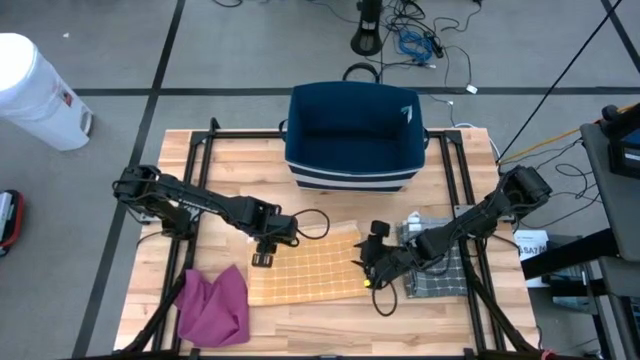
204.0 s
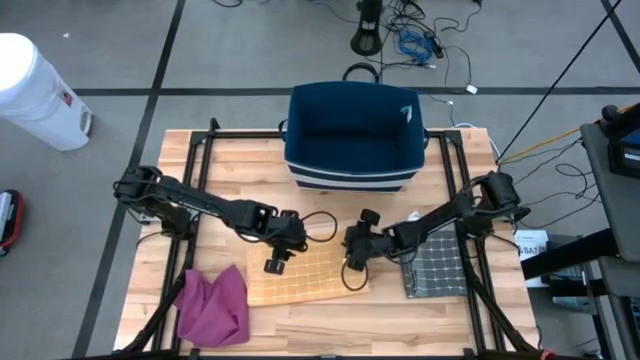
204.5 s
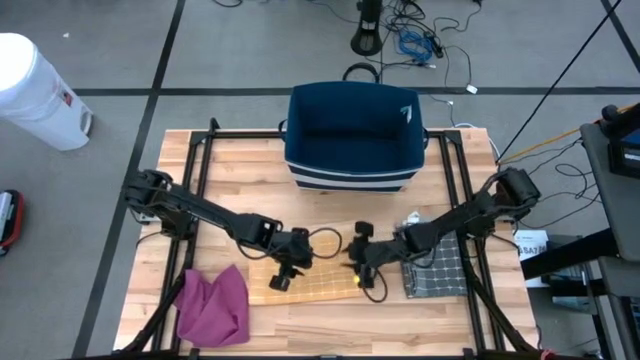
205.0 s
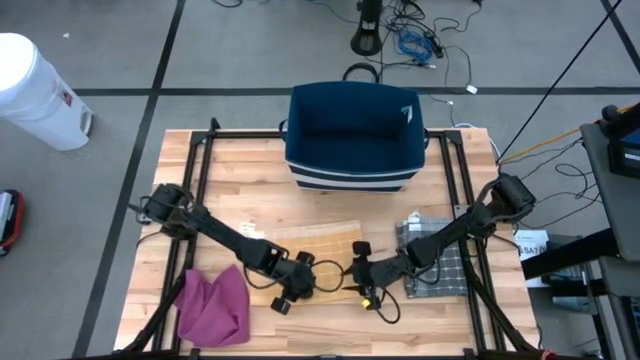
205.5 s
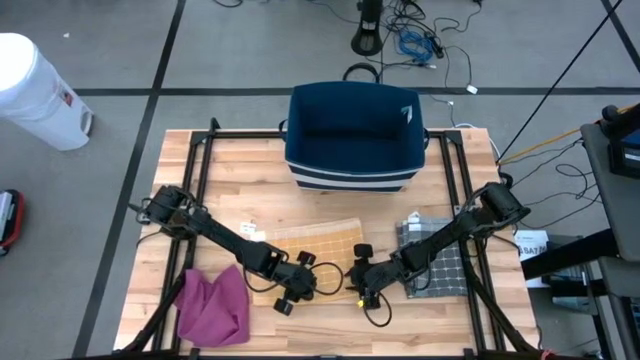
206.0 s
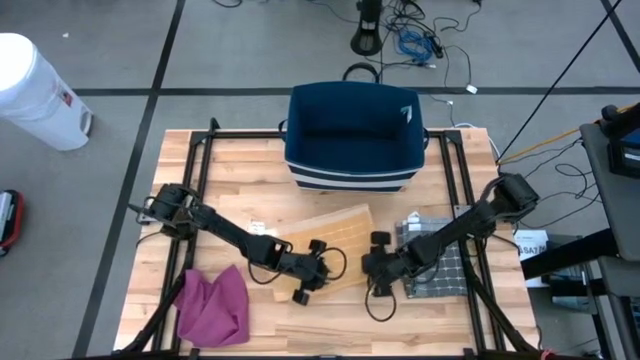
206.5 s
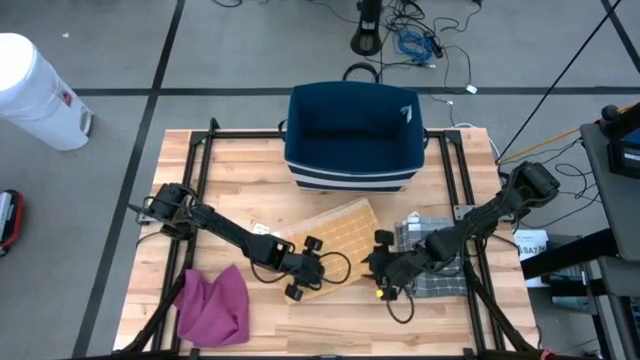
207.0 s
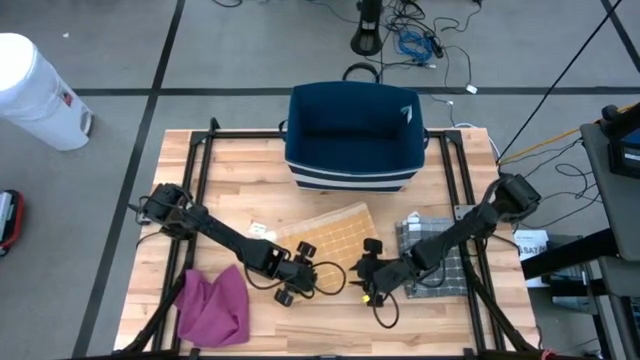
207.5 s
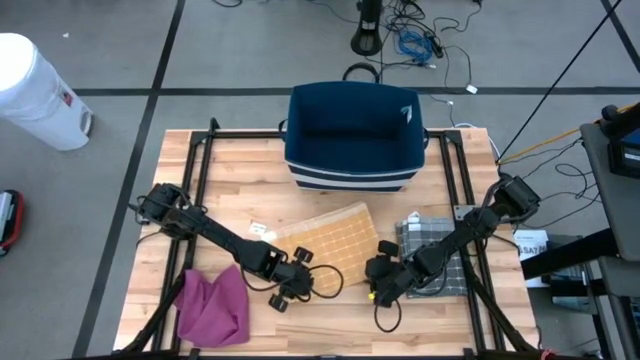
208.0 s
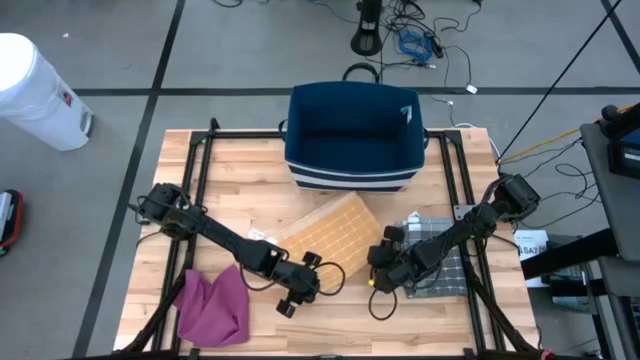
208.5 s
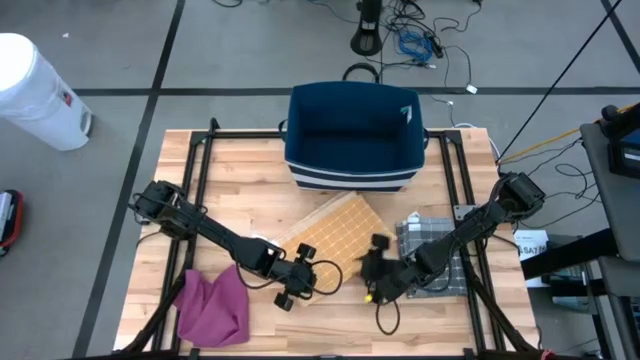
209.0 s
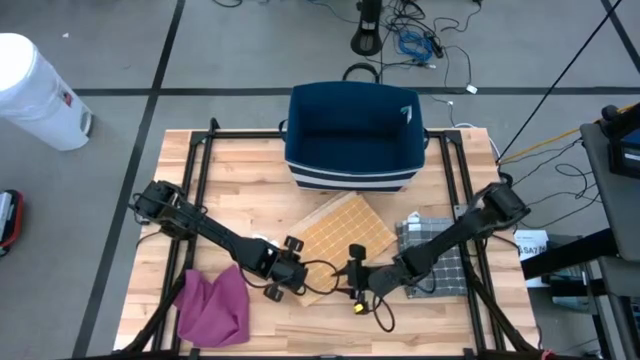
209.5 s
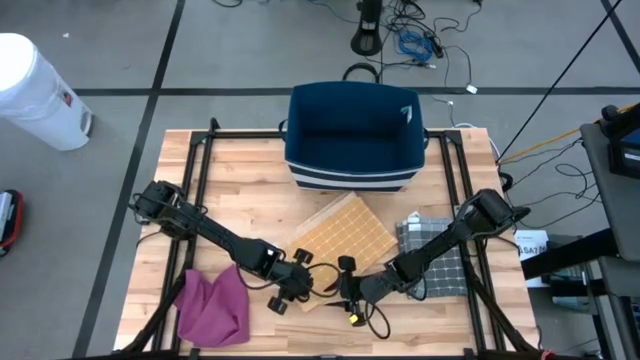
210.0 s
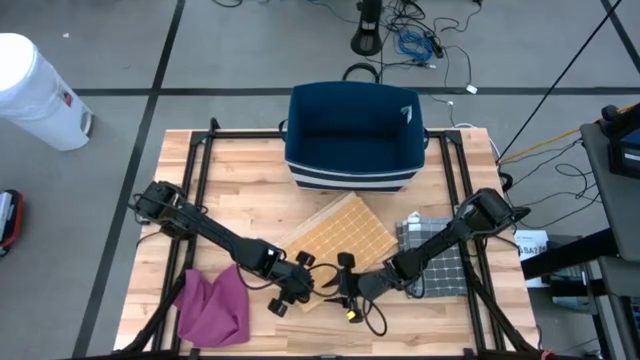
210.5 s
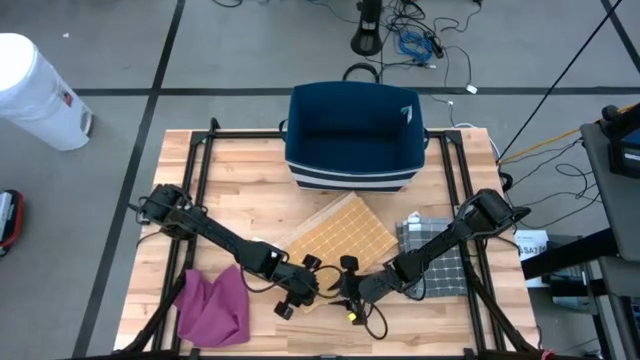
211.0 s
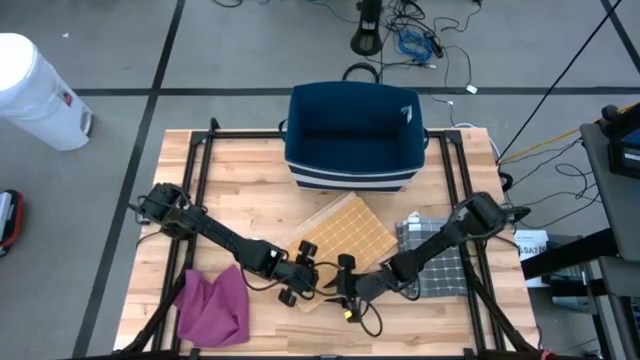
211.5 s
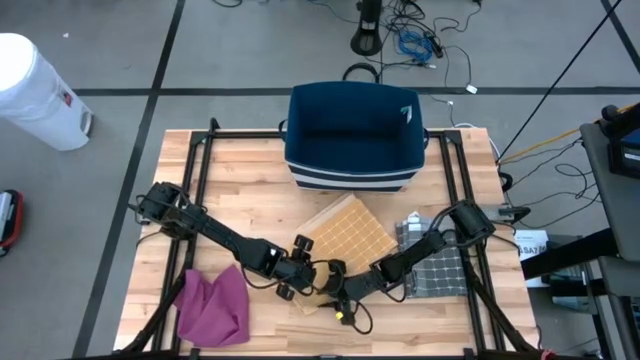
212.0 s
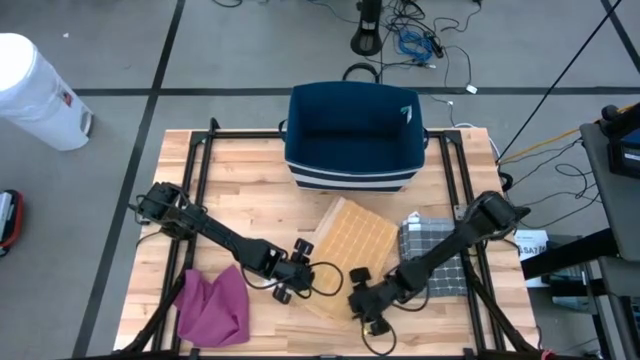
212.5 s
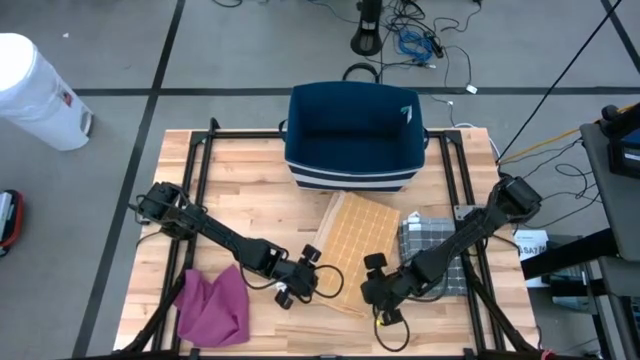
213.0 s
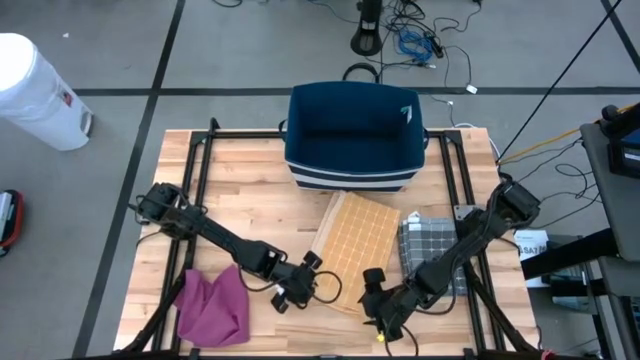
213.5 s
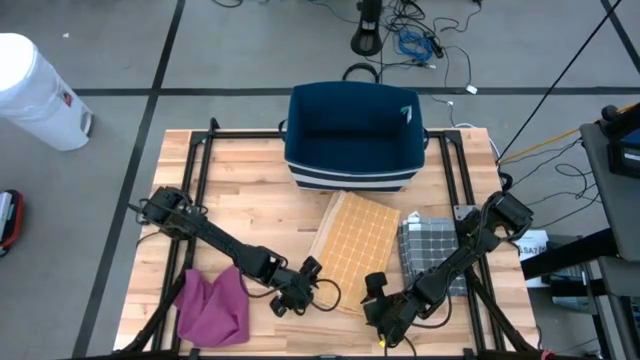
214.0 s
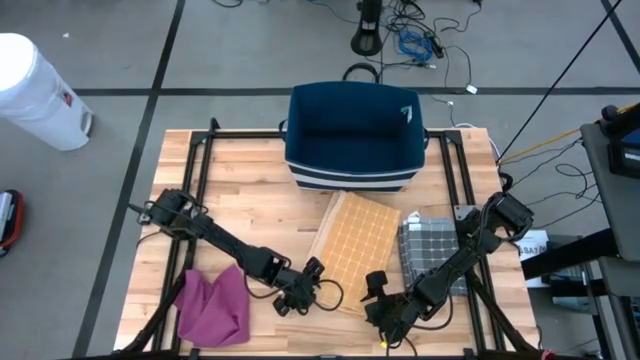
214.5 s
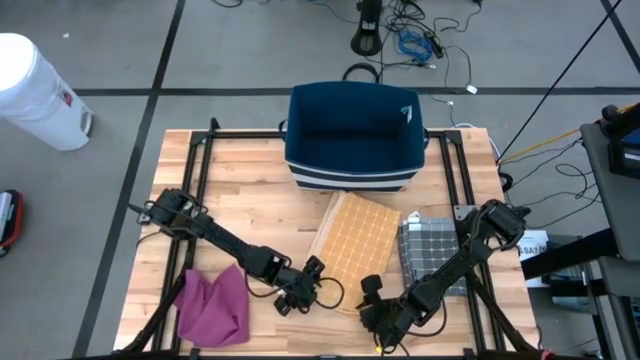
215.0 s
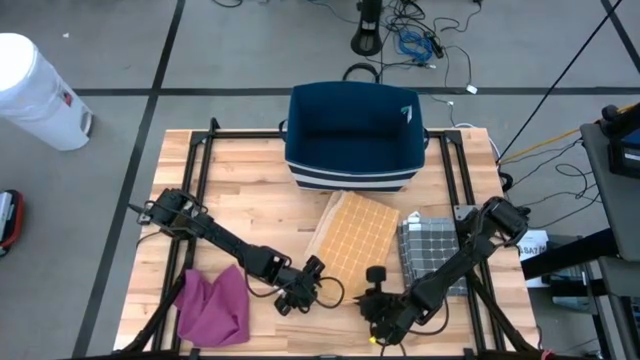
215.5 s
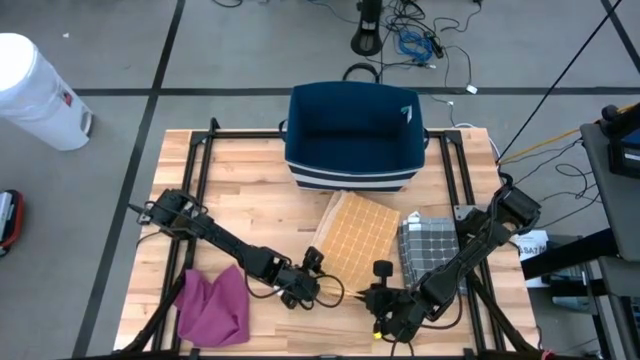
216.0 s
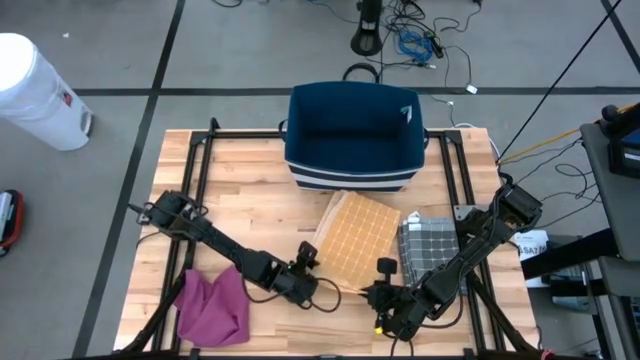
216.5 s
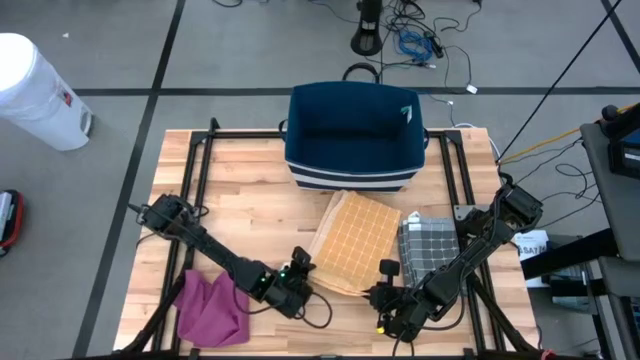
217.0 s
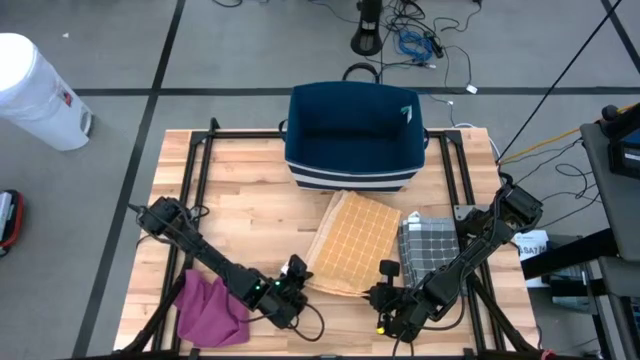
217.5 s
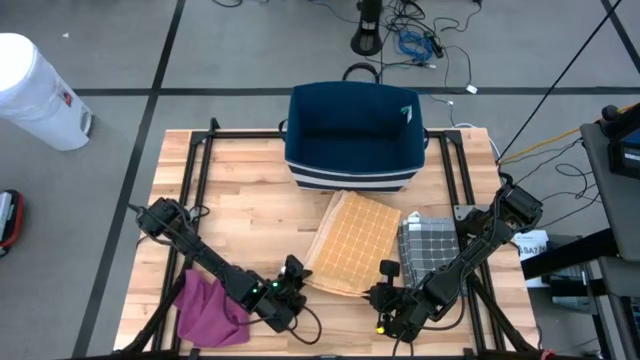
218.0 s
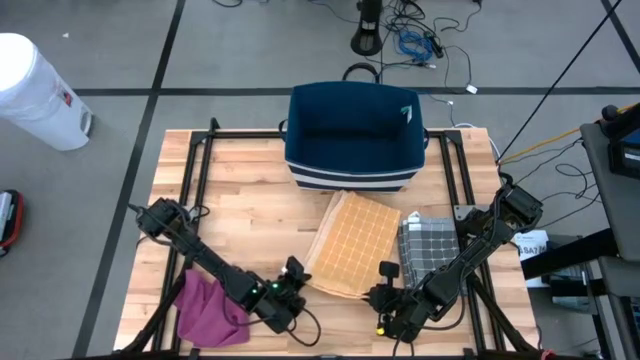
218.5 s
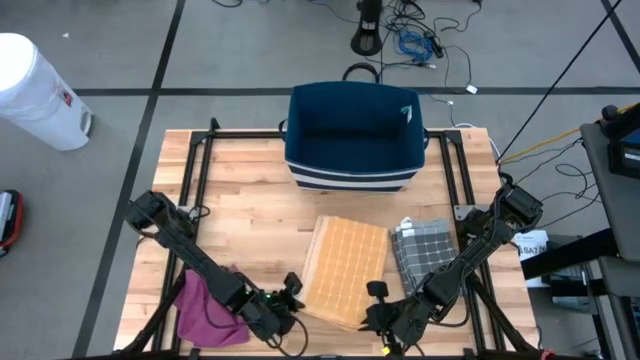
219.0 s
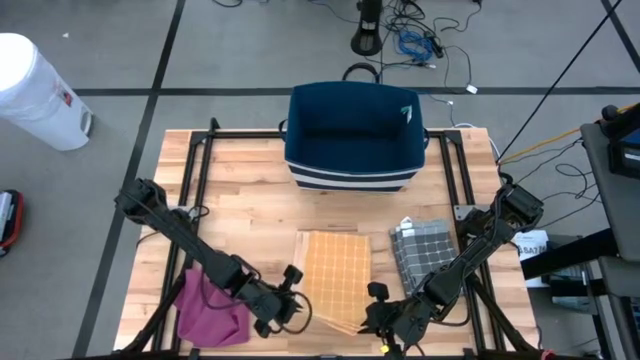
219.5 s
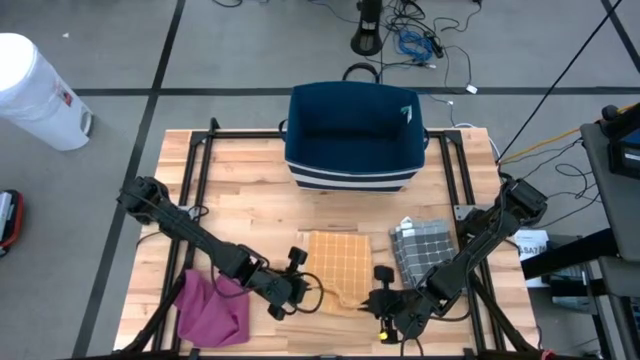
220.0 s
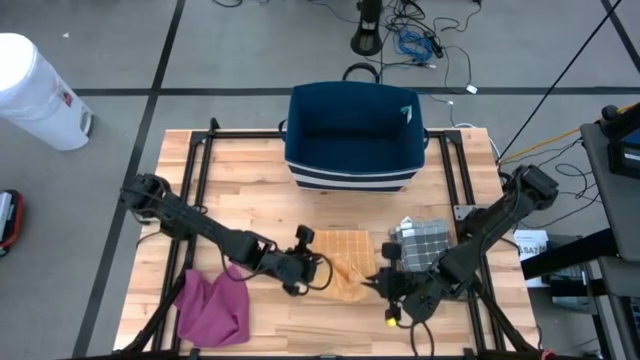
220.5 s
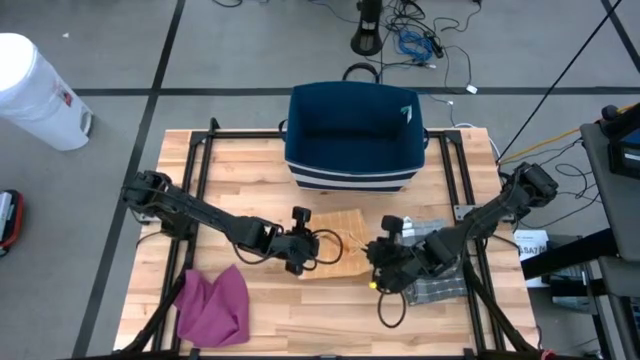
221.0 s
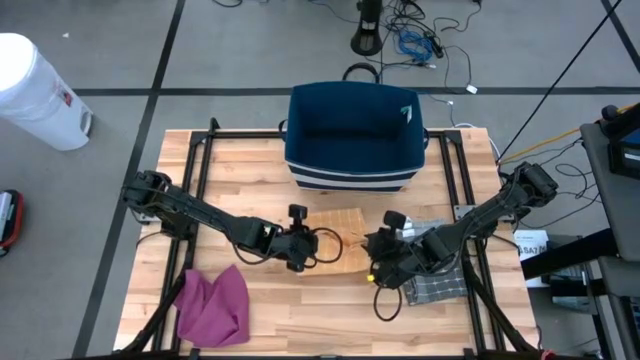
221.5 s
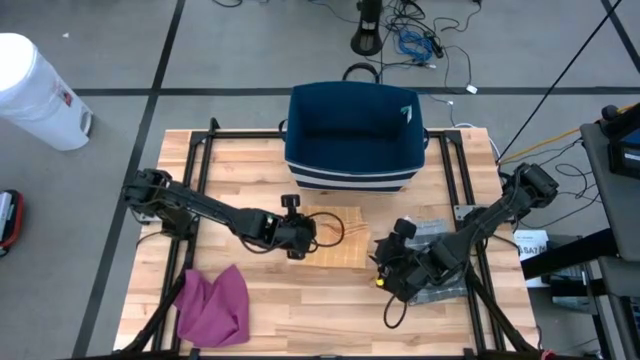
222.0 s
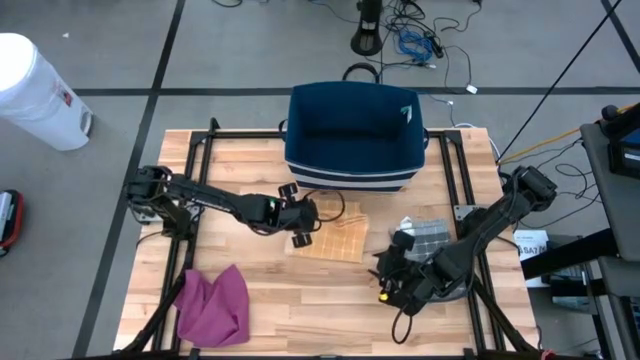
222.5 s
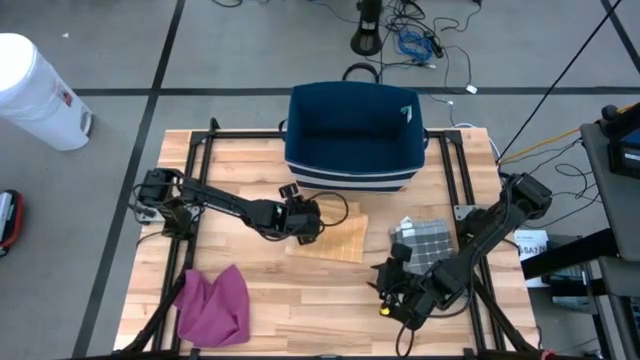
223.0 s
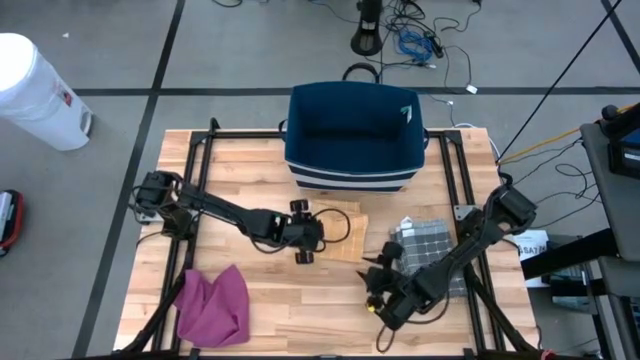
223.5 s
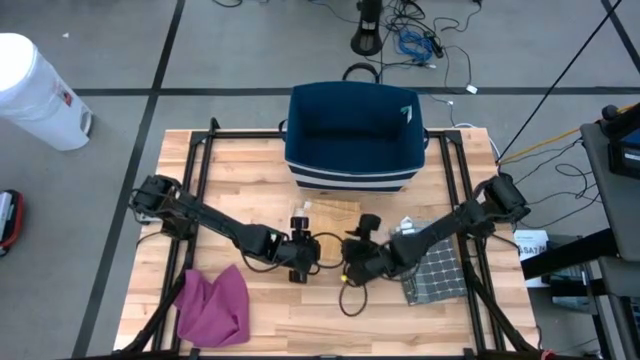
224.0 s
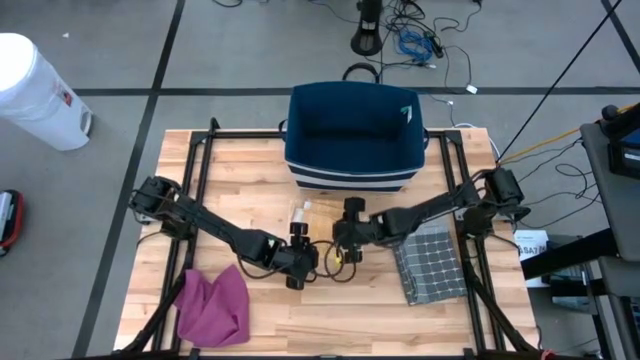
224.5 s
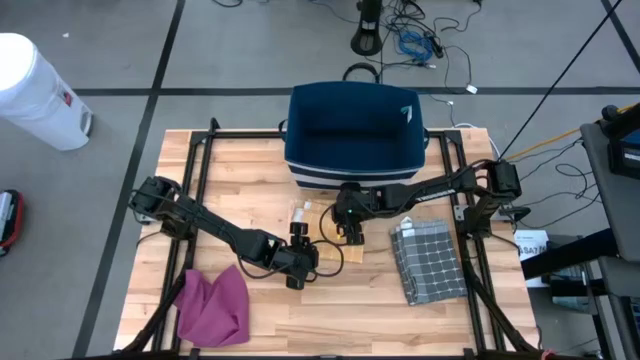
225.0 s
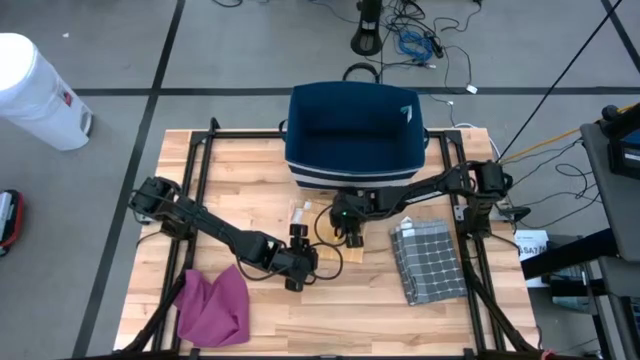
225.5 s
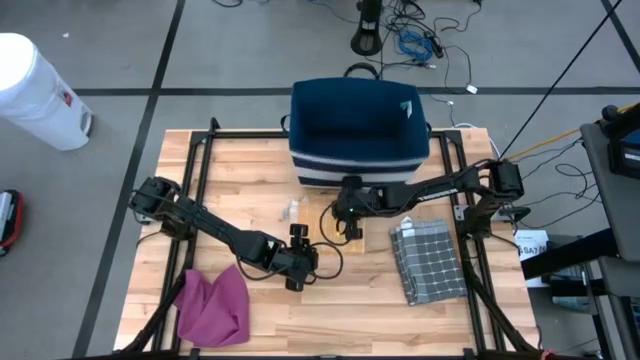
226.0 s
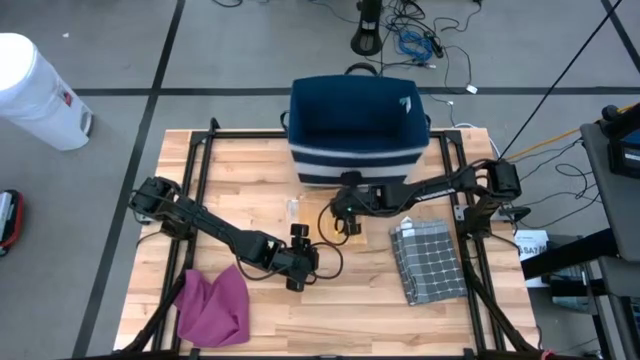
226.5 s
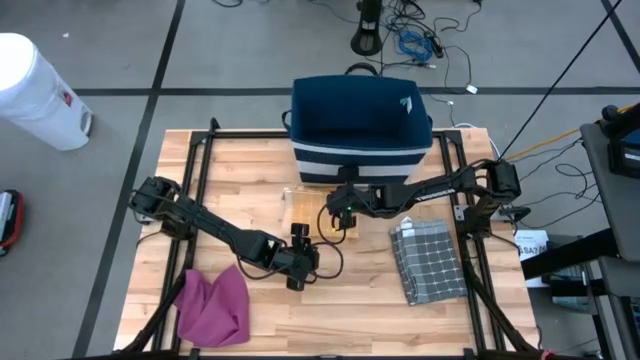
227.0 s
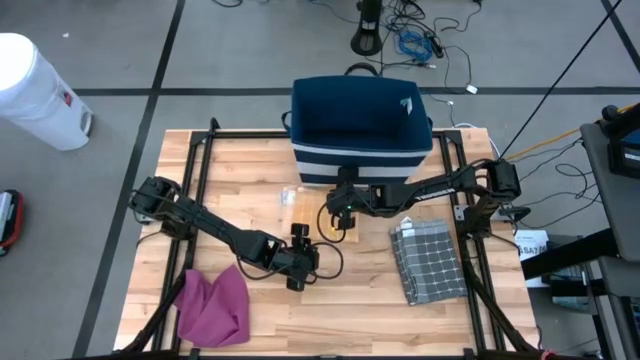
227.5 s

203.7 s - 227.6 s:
Task: Fold towel
Fold the orange patterned towel
